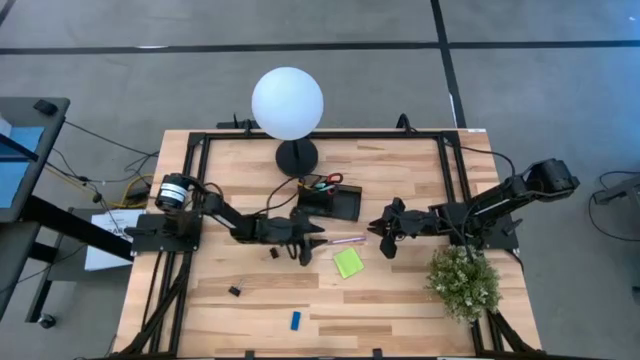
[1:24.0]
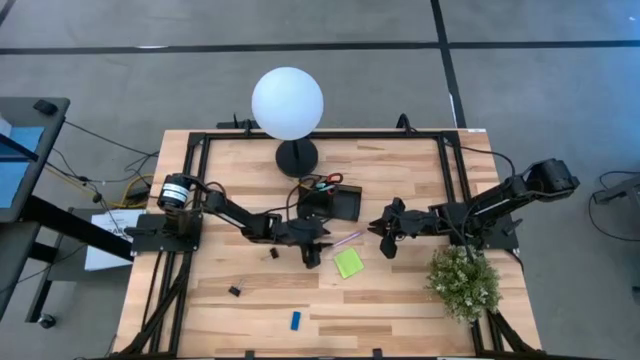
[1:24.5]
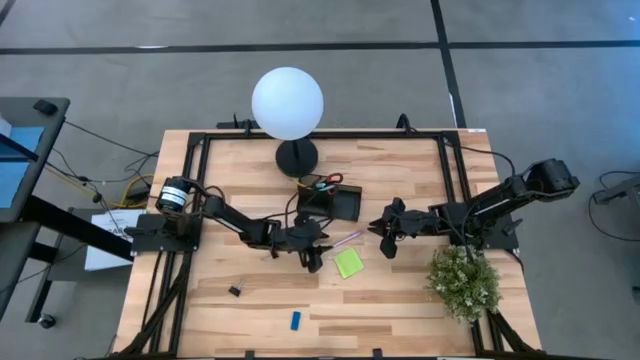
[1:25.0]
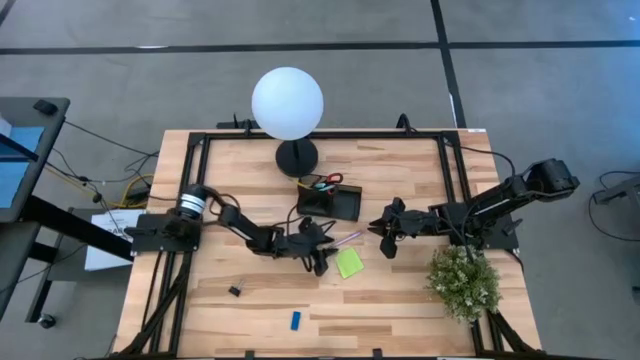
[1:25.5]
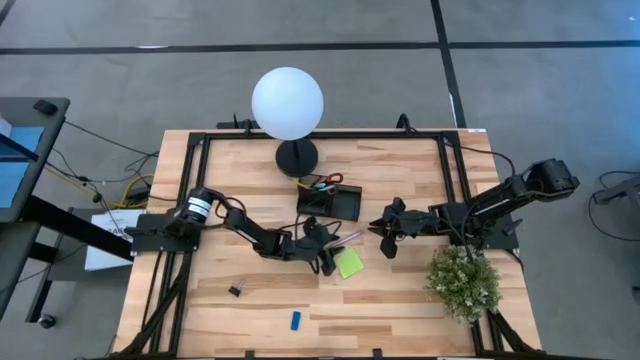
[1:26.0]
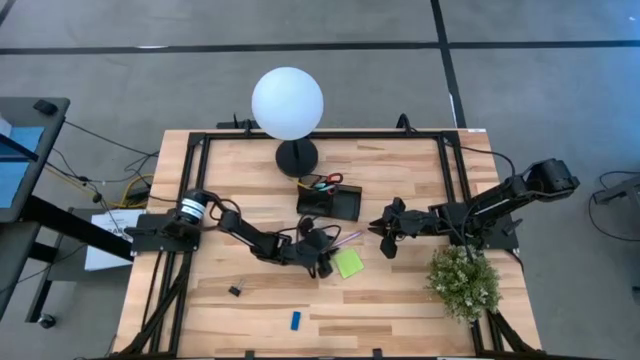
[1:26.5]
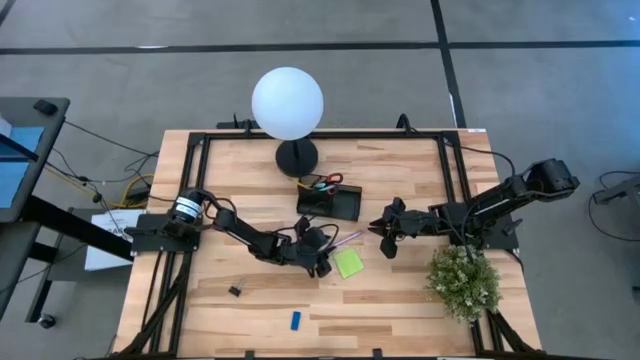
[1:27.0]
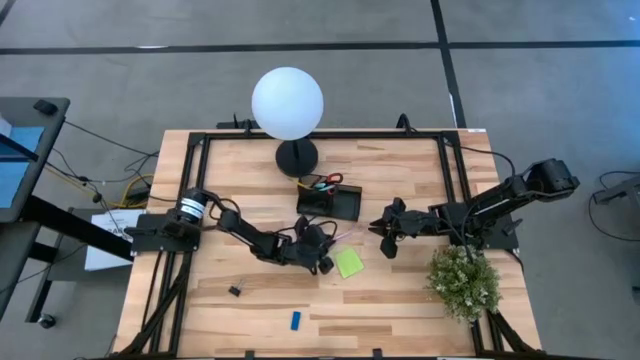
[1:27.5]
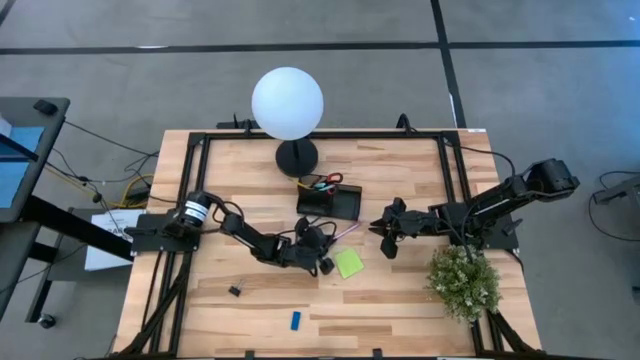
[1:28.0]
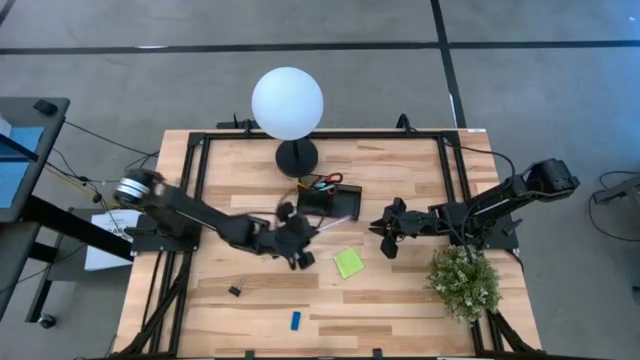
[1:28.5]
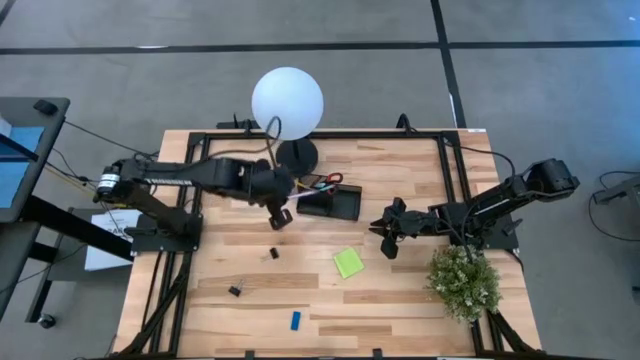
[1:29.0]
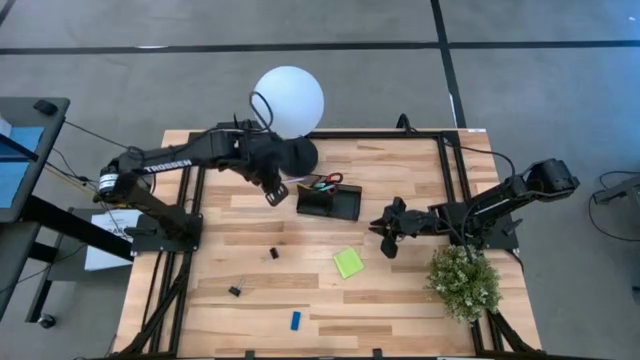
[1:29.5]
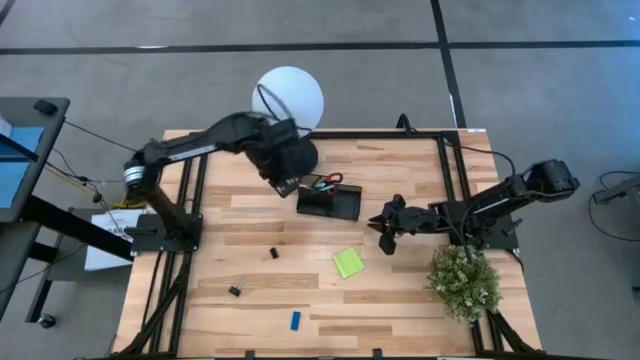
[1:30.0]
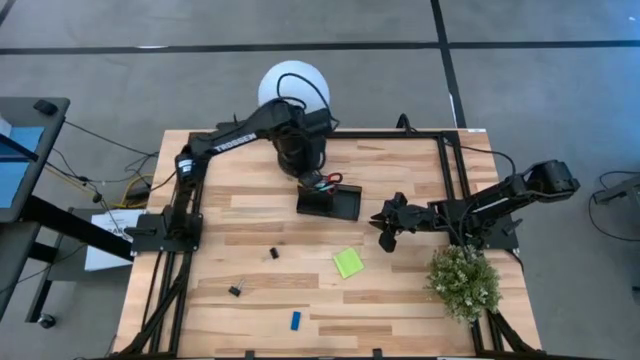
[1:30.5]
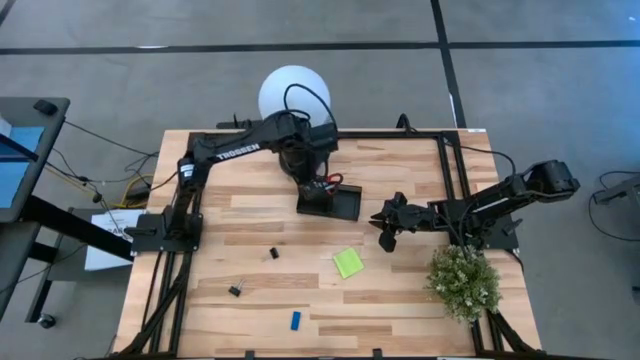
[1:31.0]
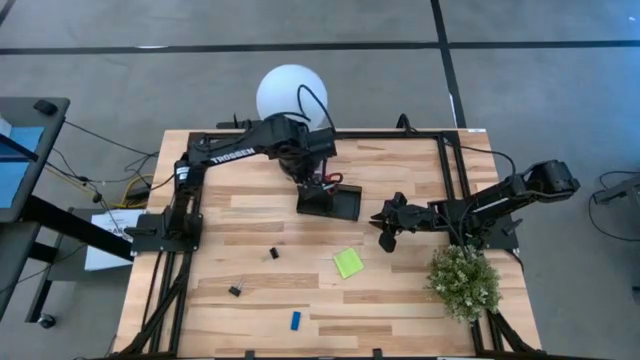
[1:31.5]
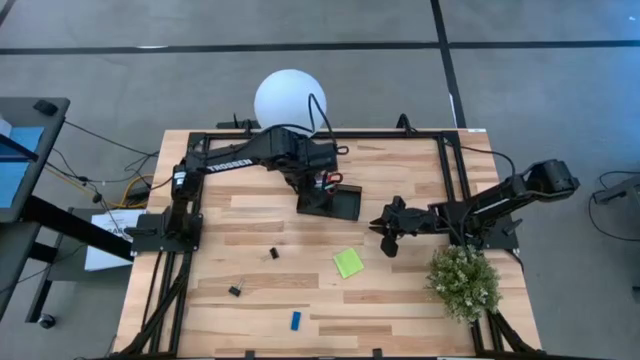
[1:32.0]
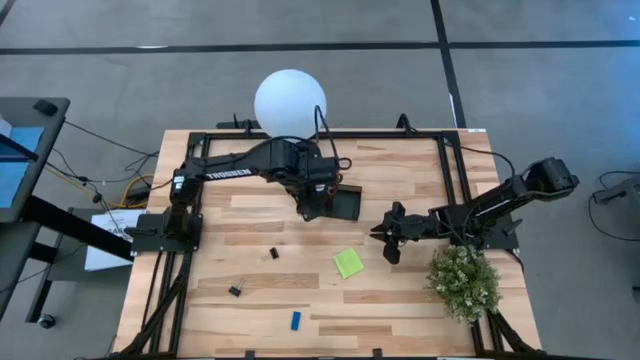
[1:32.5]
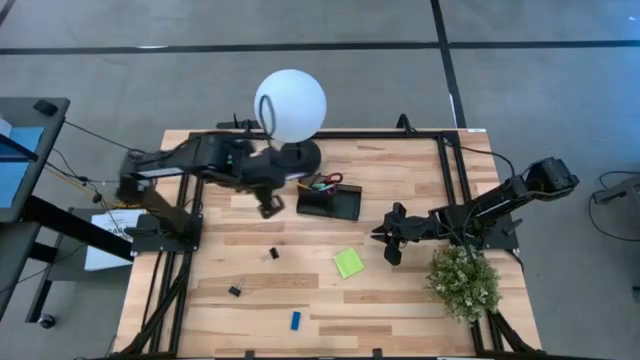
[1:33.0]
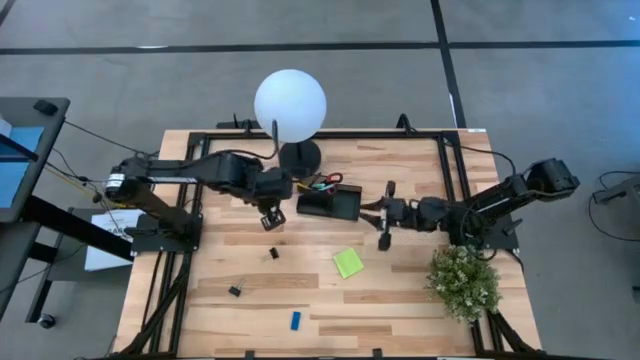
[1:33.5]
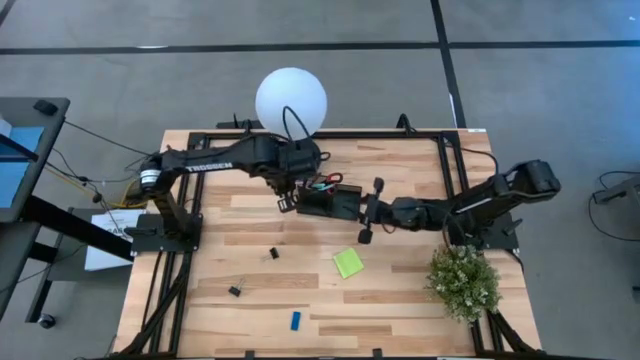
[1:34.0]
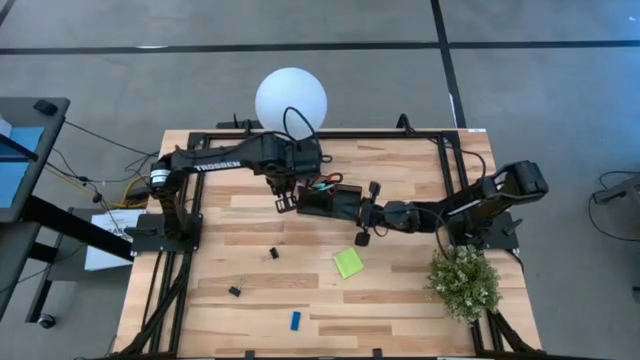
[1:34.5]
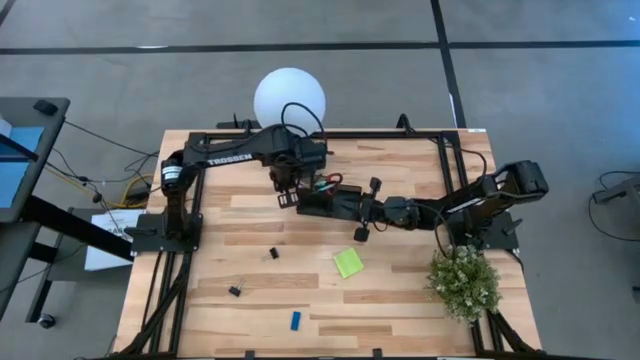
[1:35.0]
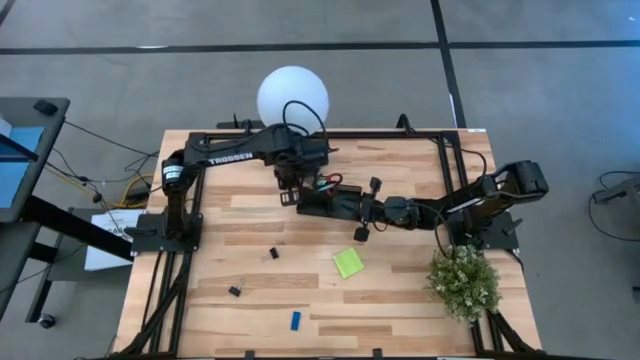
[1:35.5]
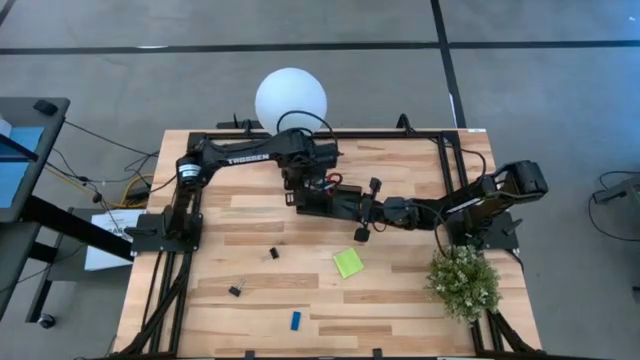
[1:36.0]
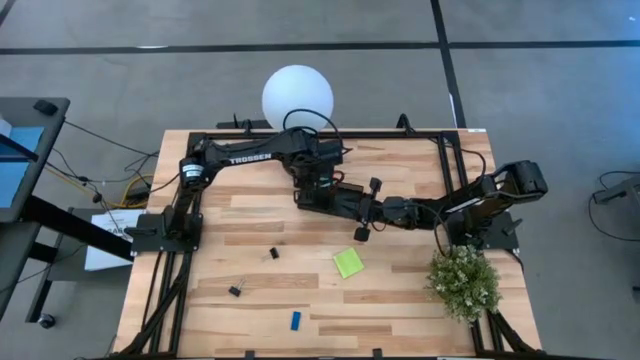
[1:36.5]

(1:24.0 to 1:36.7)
Task: Pick and place office supplies into organizer
Put the purple mechanical pencil into the desk organizer

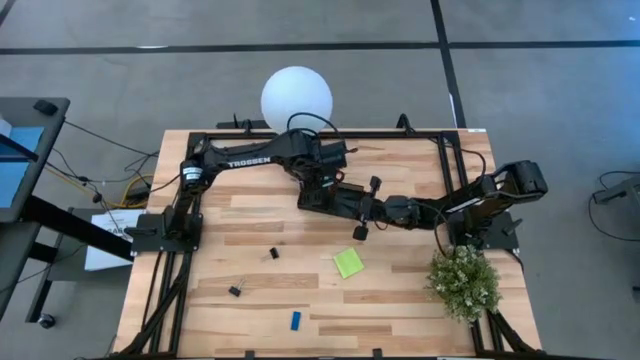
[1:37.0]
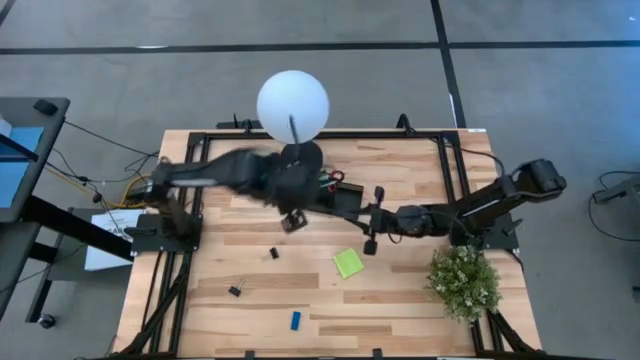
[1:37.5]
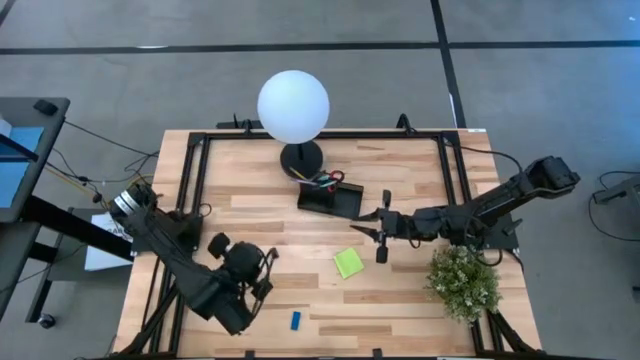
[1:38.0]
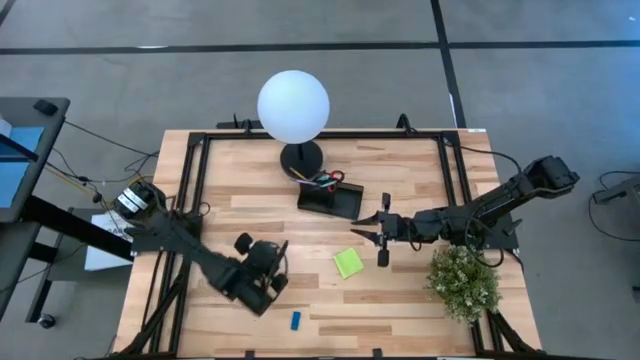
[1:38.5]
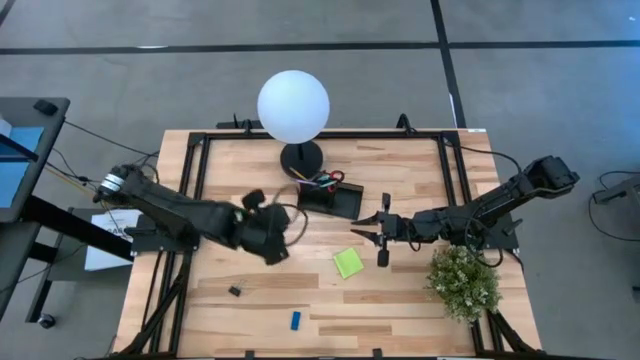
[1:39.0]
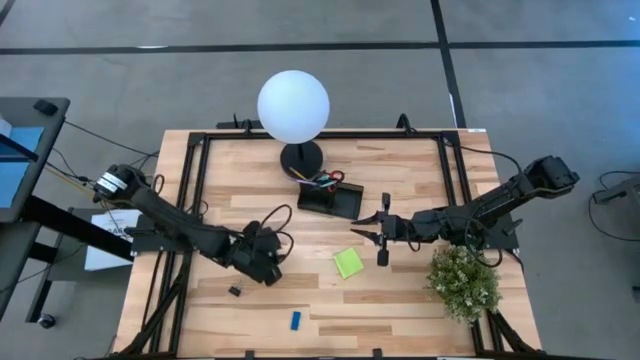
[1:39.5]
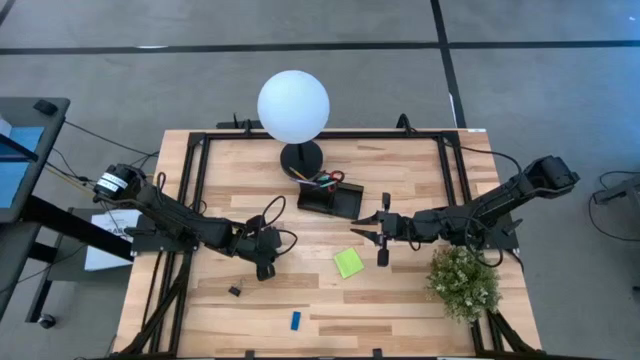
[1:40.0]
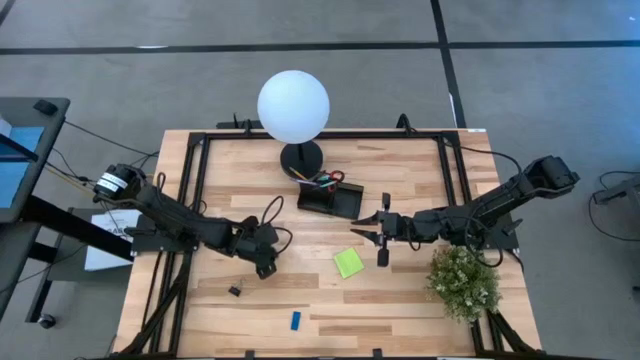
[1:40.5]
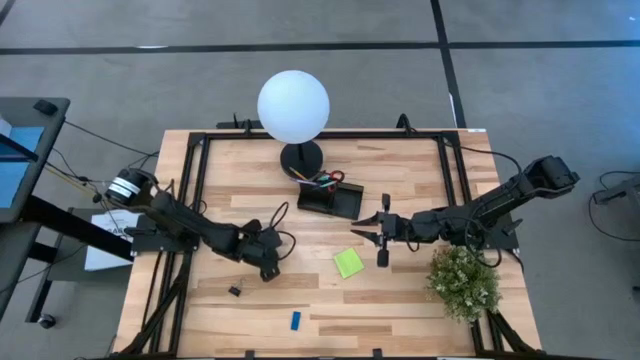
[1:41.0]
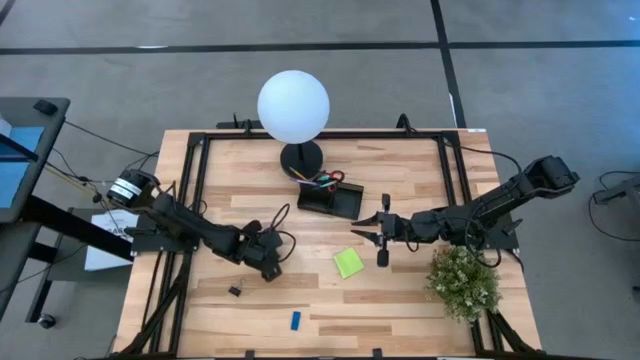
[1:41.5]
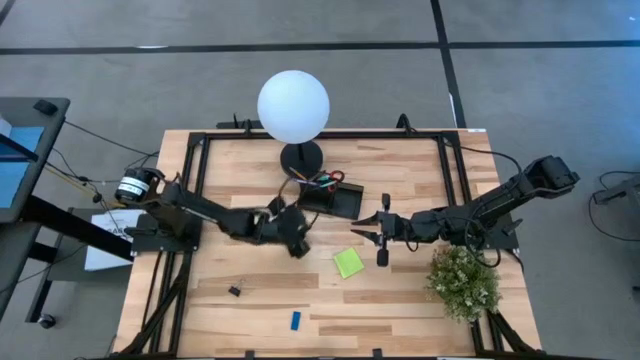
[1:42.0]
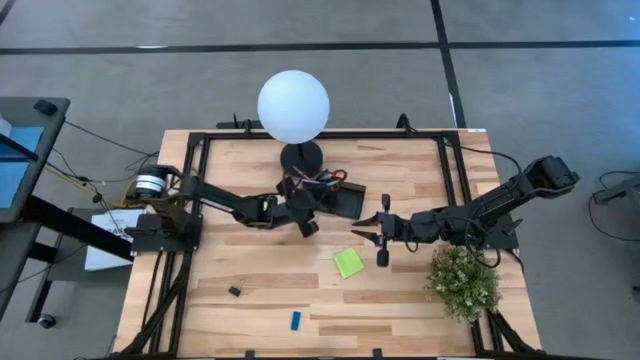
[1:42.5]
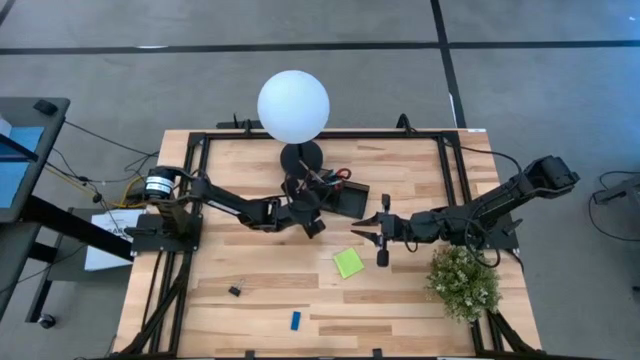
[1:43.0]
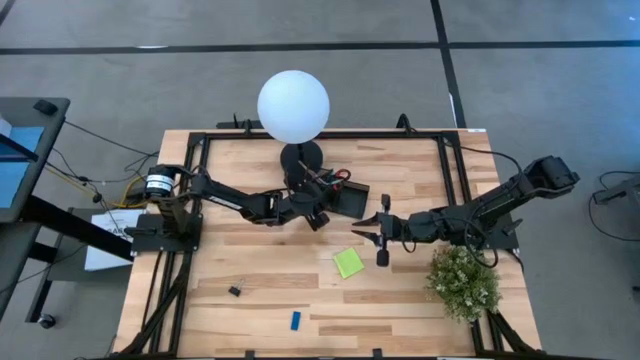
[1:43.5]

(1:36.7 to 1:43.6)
Put the top binder clip into the desk organizer

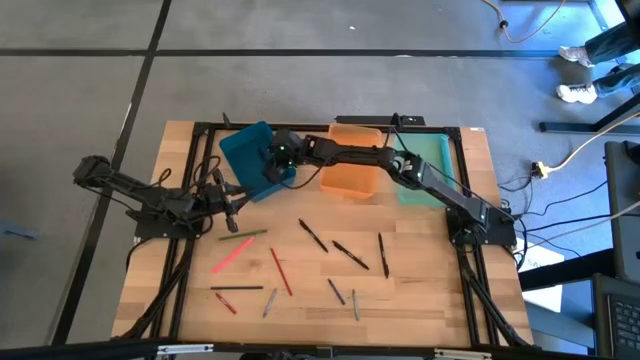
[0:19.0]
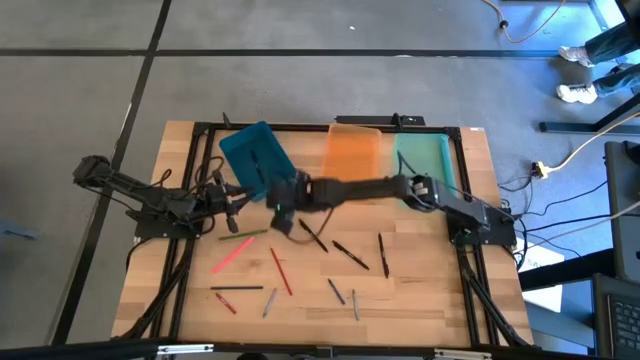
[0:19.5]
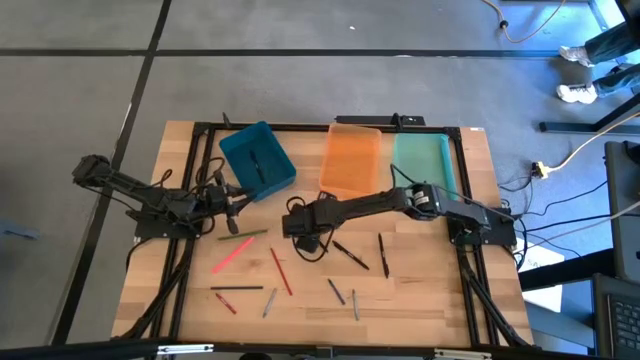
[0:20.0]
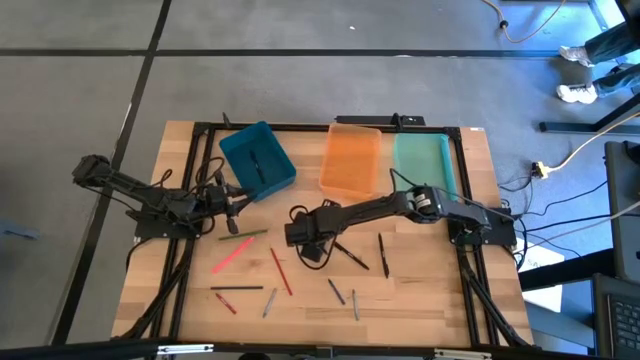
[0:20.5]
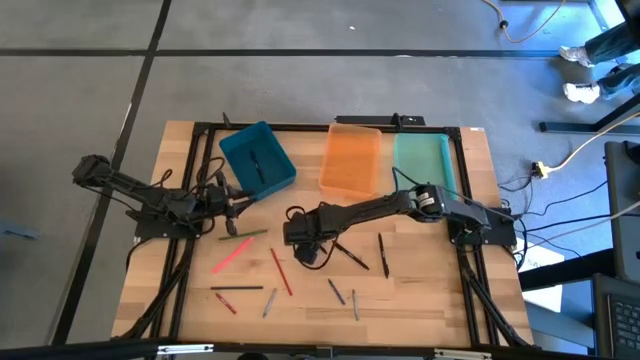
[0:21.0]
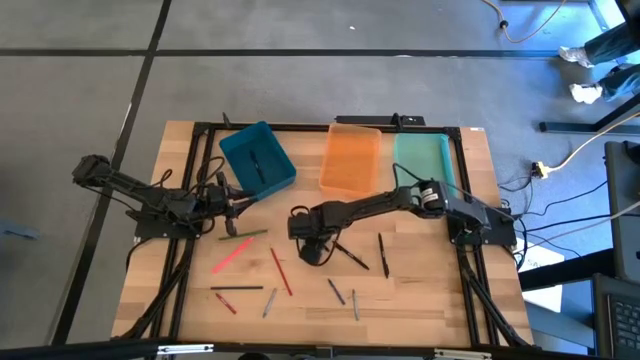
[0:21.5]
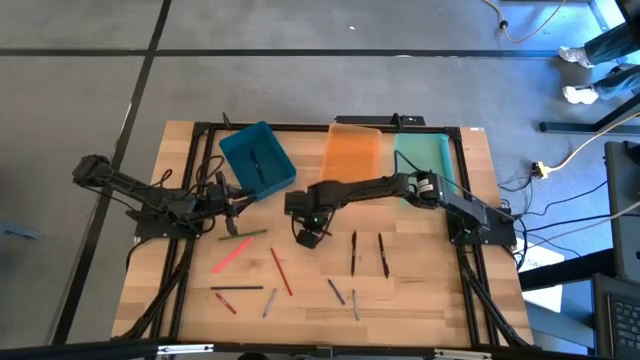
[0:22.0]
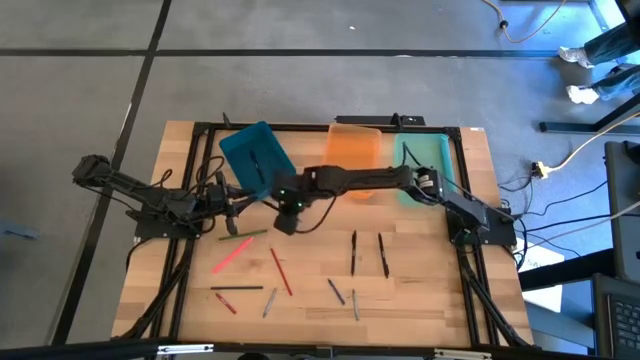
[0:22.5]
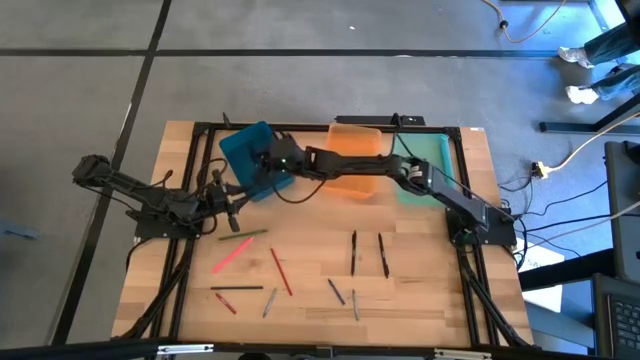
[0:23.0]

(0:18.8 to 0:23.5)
Task: Sort crayons/erasers/pens/pencils in bins
Put the left black pen into the blue bin
